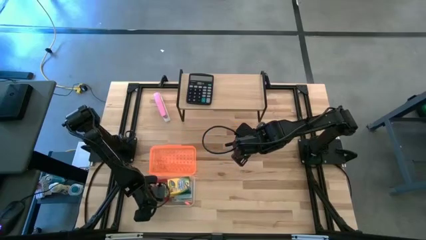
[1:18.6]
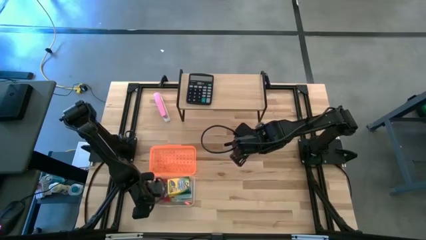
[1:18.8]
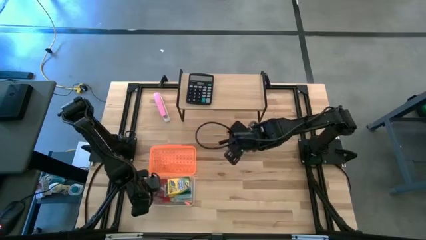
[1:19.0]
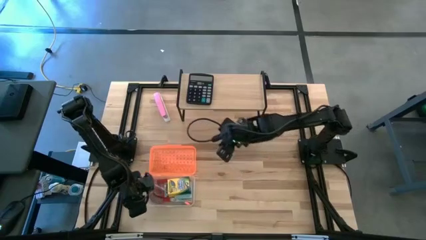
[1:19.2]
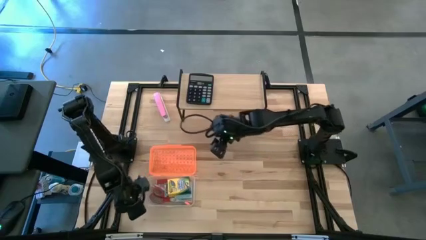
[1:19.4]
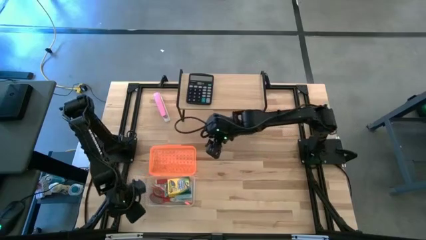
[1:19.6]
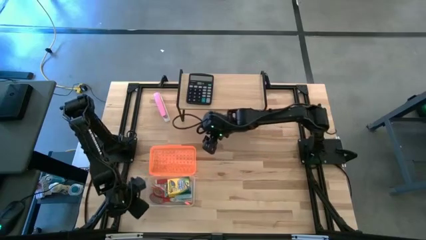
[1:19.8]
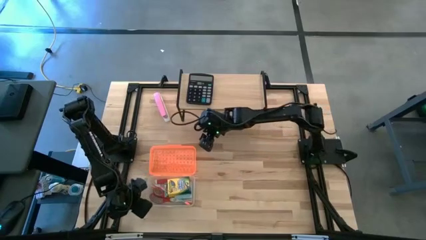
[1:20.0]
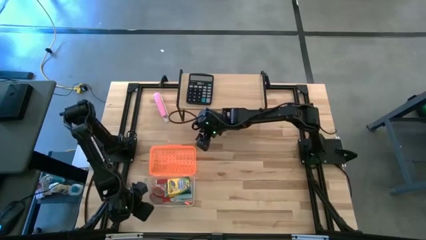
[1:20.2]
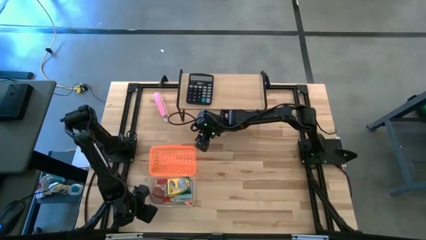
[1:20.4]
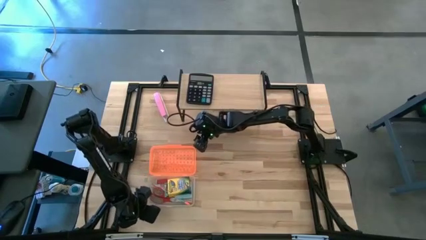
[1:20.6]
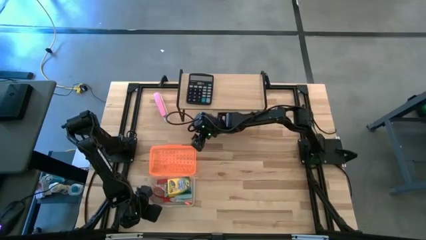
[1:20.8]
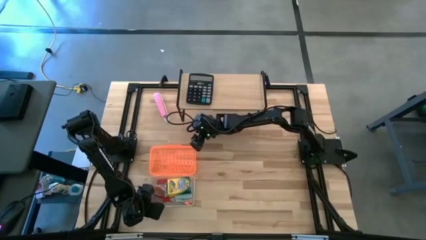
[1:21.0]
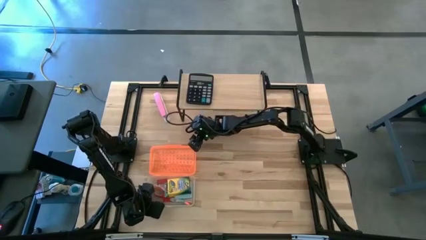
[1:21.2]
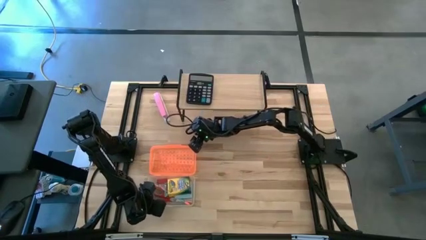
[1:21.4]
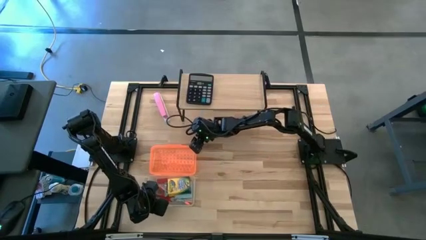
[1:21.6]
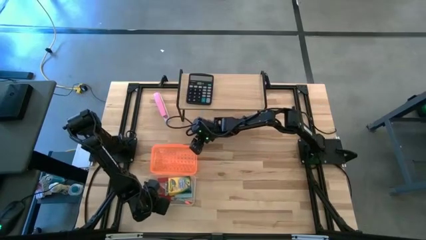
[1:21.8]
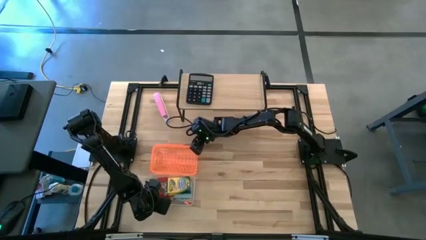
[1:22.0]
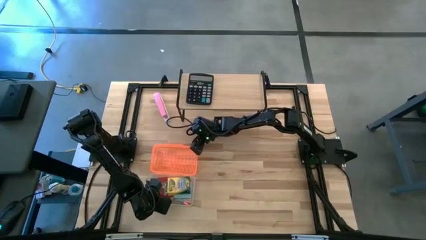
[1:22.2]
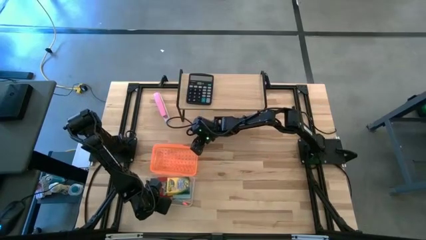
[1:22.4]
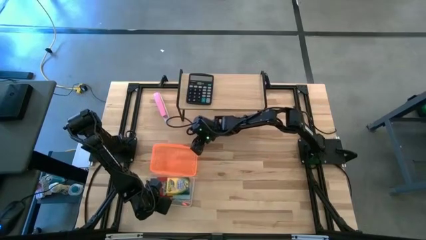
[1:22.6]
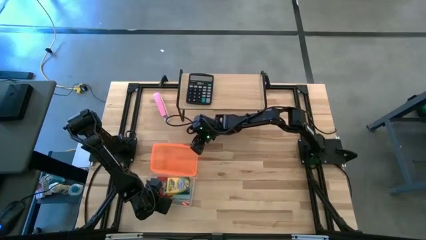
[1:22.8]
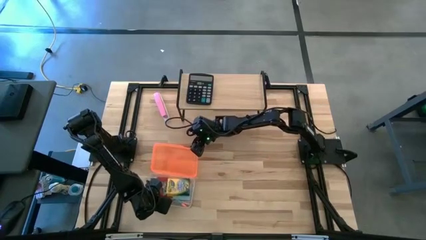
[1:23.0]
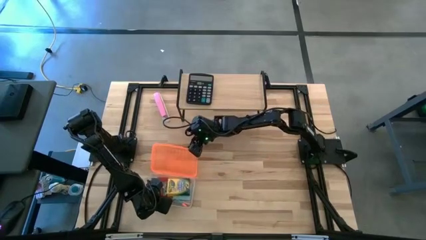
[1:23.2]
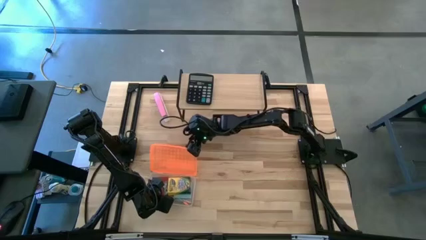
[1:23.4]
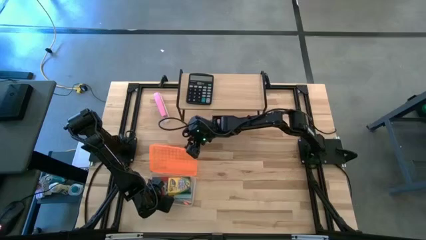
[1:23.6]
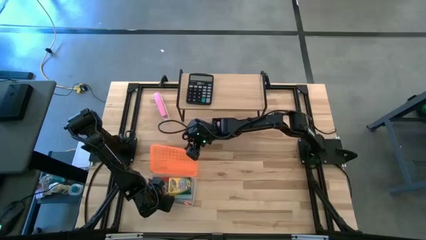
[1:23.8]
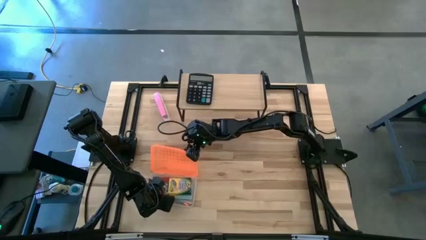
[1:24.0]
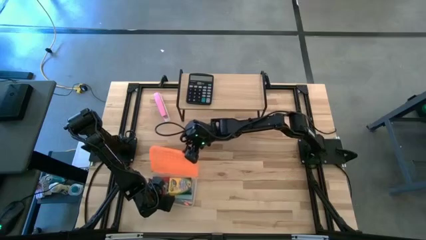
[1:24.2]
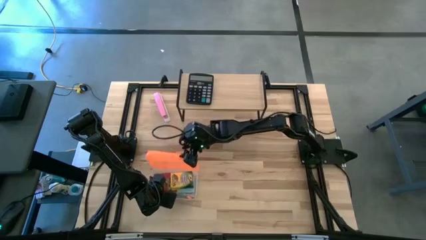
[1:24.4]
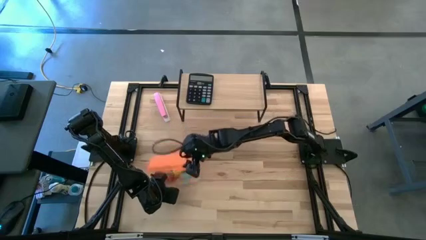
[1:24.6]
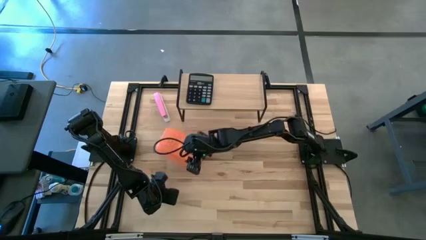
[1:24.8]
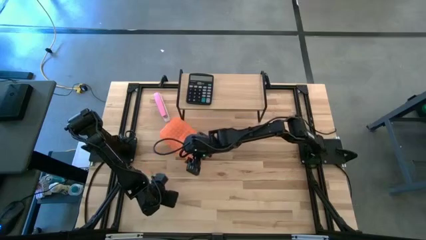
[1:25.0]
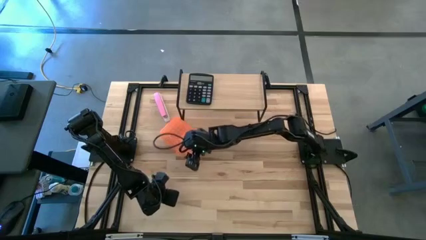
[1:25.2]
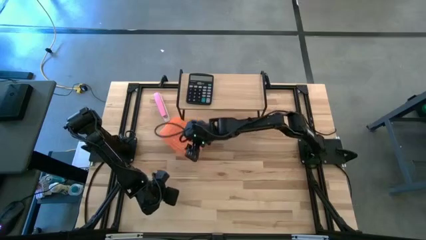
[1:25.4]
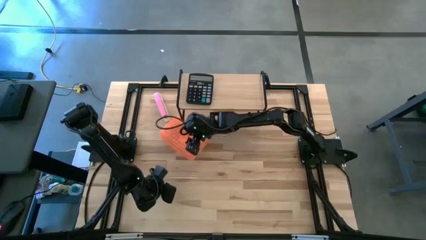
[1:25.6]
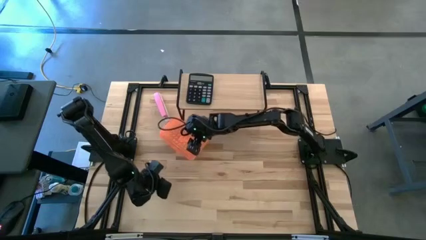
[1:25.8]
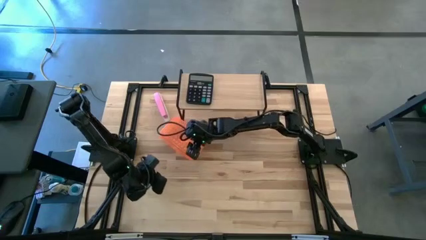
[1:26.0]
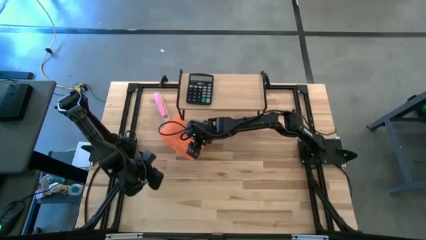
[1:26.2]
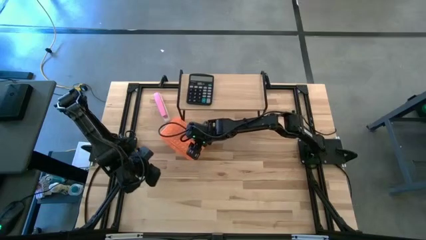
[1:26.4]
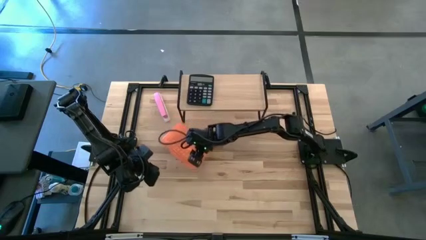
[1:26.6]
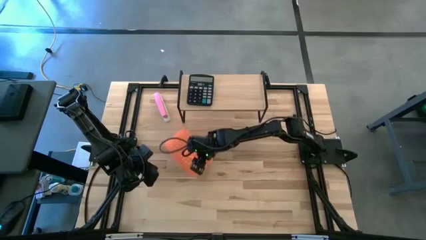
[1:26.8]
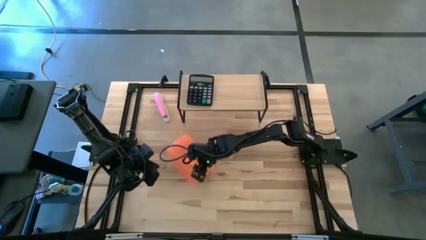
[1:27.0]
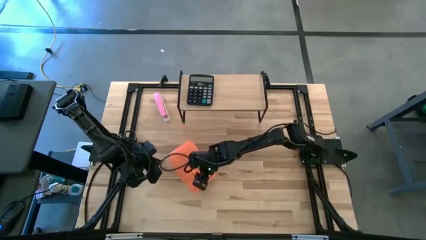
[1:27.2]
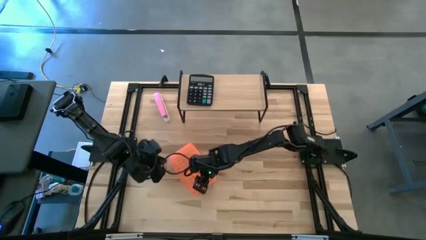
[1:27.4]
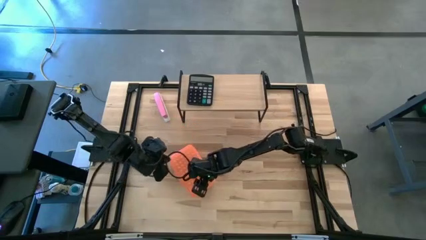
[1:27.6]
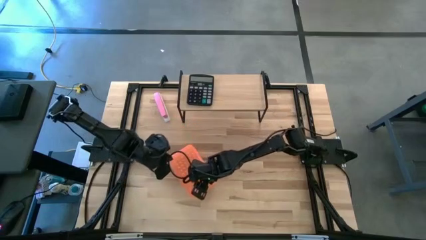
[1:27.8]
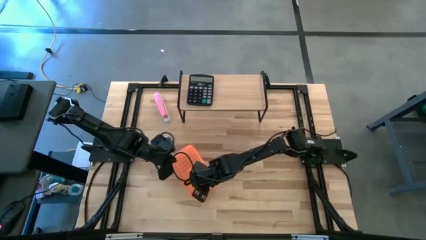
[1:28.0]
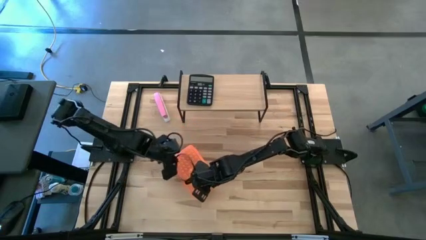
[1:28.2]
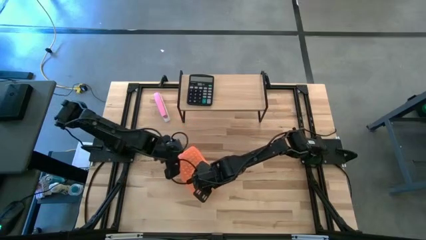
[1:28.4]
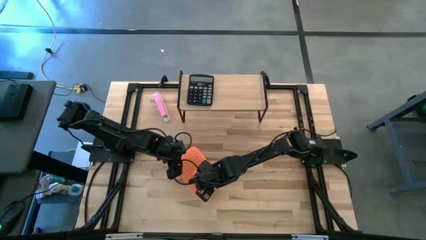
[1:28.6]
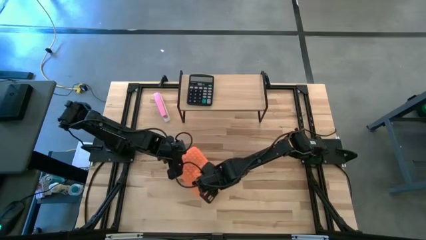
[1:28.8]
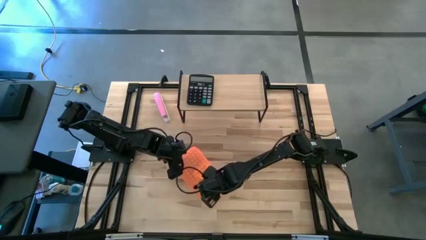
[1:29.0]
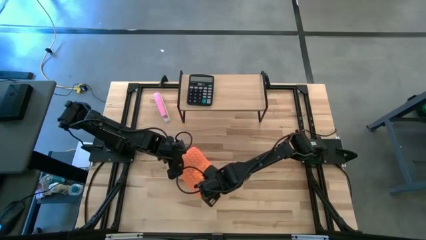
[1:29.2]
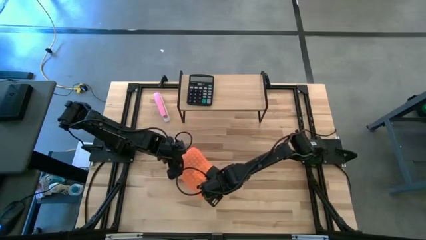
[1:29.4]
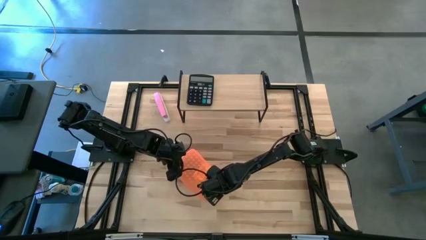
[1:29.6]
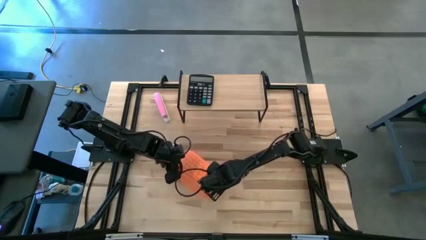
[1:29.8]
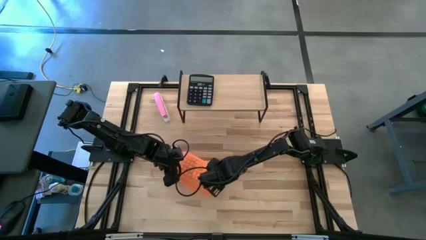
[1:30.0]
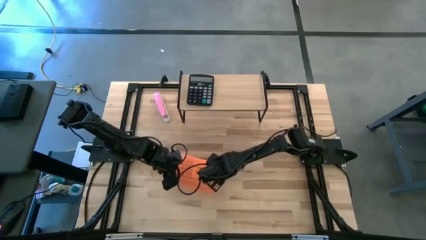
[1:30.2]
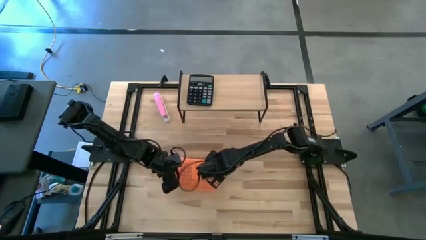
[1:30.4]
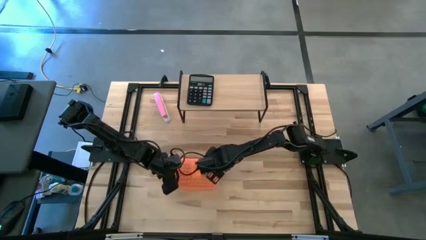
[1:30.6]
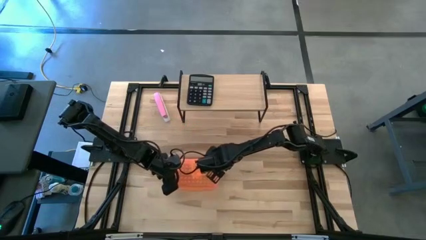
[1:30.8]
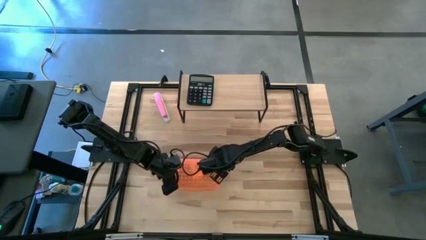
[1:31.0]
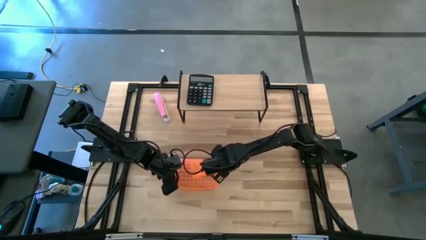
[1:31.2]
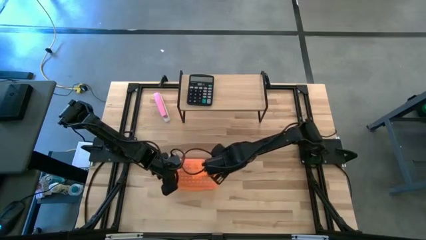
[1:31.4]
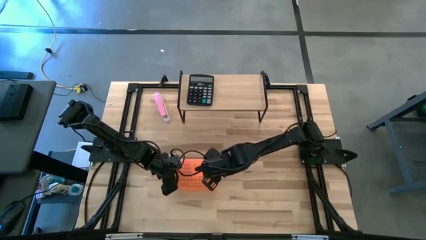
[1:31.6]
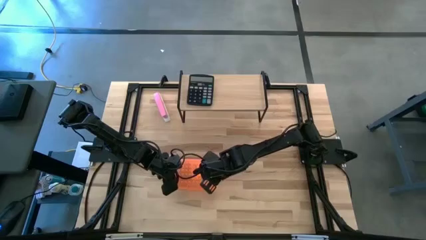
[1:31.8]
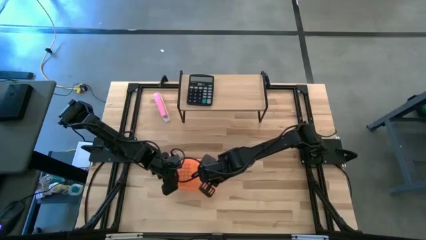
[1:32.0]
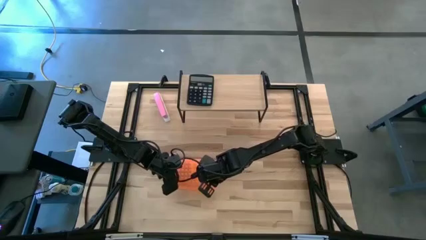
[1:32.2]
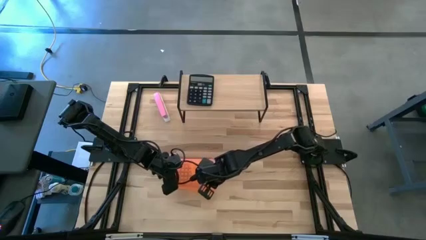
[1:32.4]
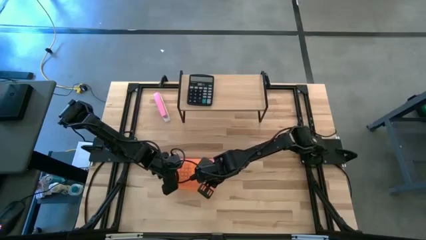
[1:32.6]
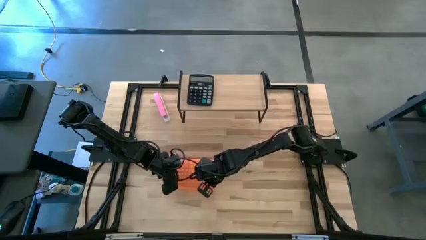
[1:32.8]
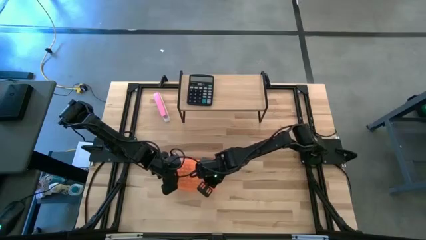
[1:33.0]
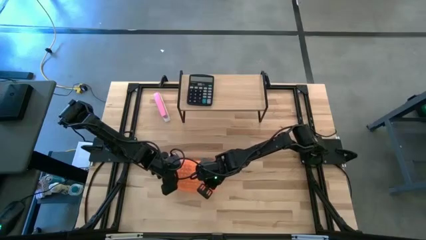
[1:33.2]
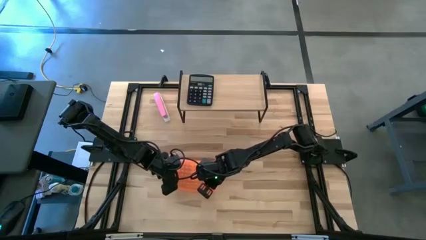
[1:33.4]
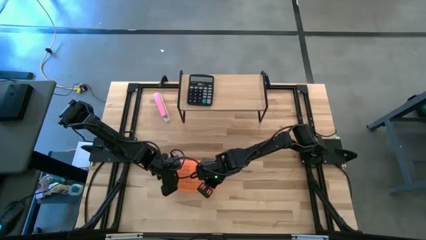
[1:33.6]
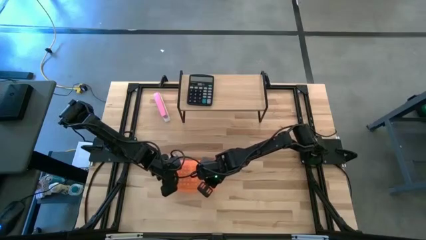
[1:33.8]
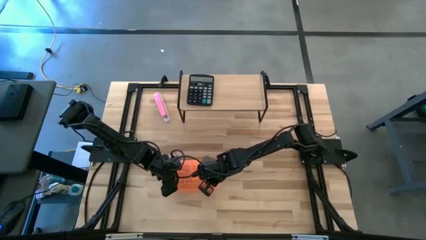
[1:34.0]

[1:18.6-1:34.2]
Task: Pack school essentials
Close the supply box

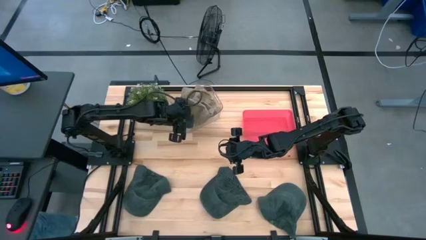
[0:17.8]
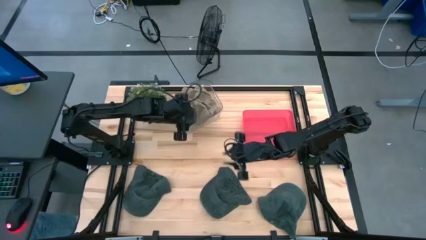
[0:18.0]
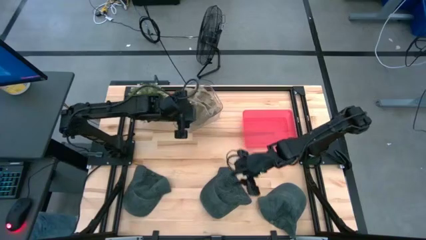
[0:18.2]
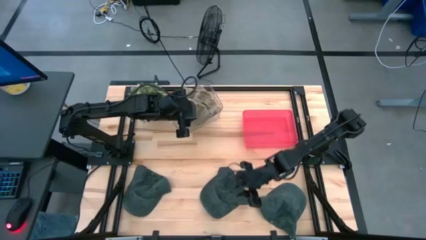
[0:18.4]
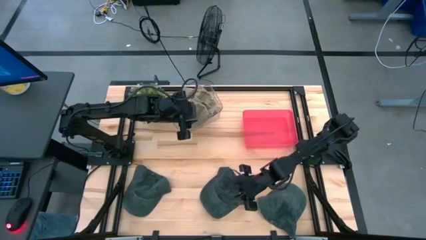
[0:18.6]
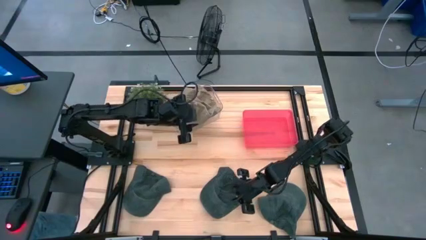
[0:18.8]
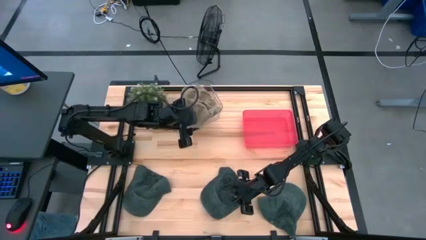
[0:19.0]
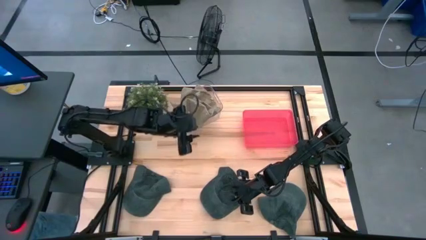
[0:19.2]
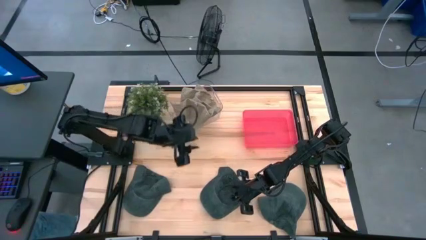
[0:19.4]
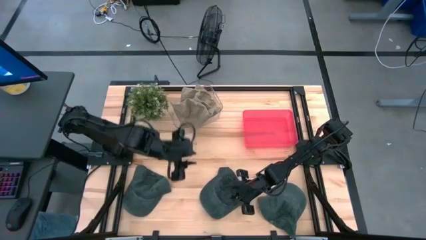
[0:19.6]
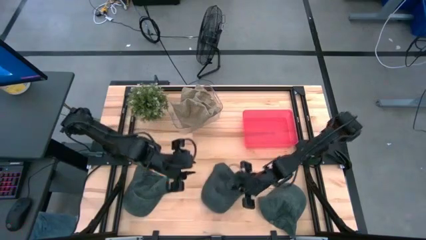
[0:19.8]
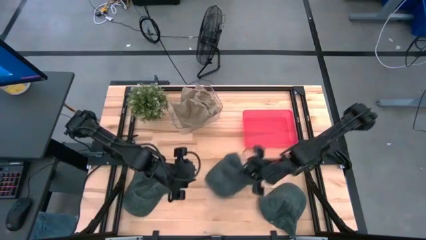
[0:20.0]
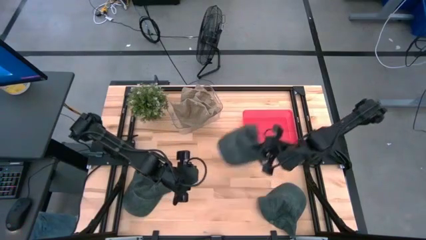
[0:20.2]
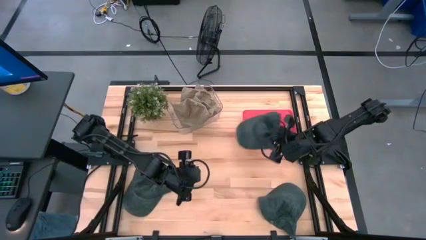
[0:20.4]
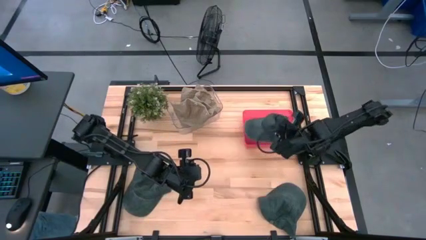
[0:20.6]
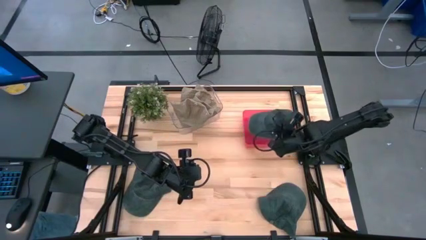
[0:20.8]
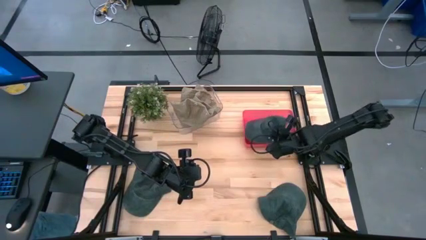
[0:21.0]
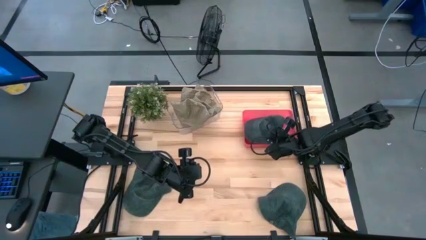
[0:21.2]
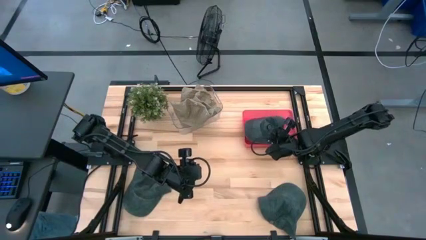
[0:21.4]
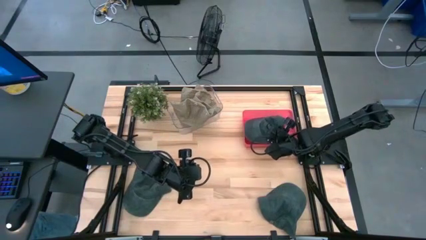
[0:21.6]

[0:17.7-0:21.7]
Task: Pick & Place hat
Put the middle black cap into the red bin
